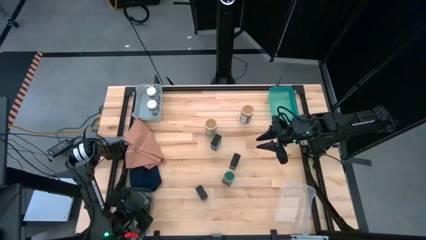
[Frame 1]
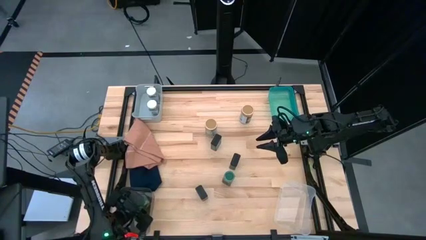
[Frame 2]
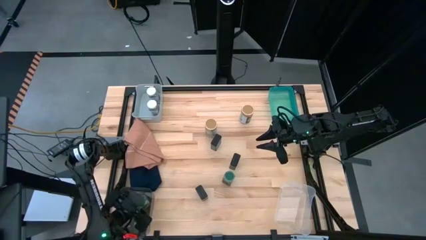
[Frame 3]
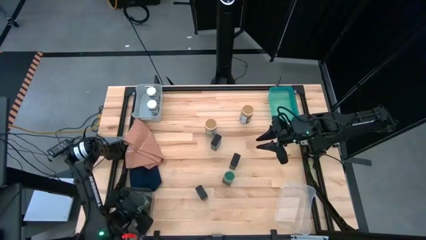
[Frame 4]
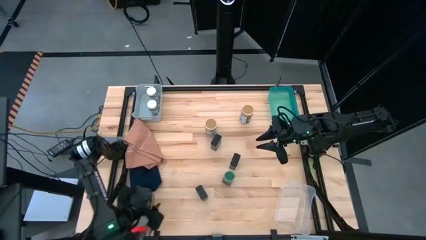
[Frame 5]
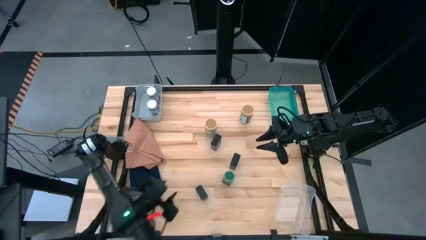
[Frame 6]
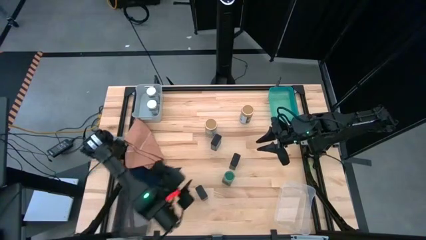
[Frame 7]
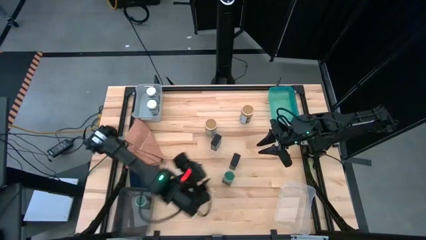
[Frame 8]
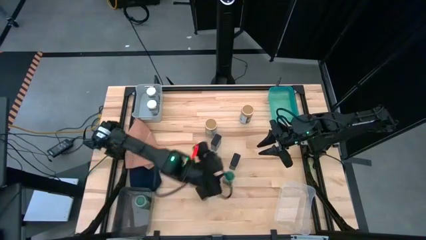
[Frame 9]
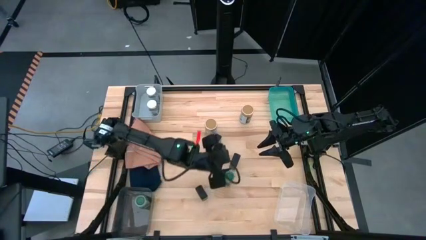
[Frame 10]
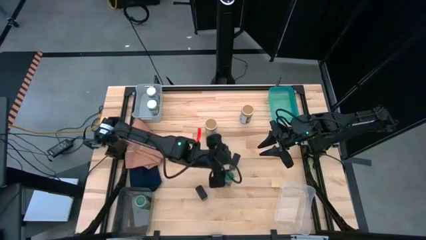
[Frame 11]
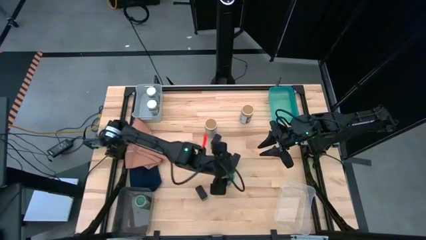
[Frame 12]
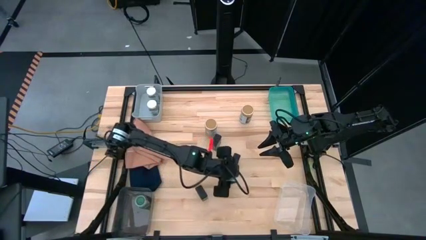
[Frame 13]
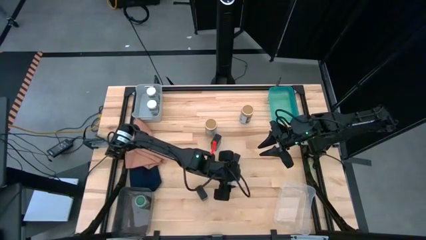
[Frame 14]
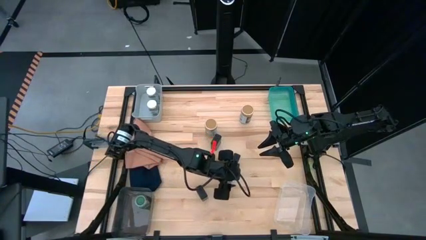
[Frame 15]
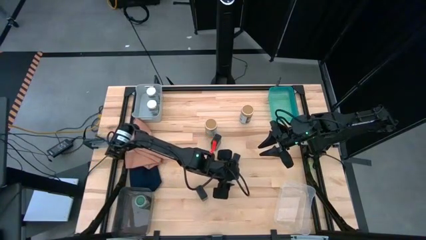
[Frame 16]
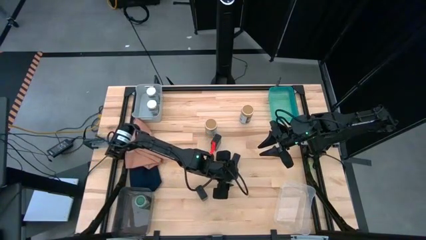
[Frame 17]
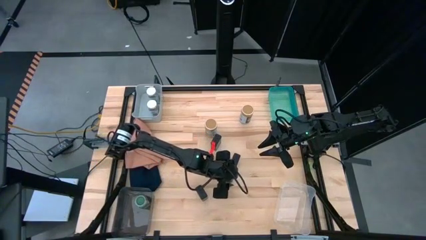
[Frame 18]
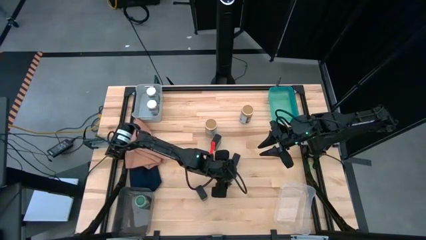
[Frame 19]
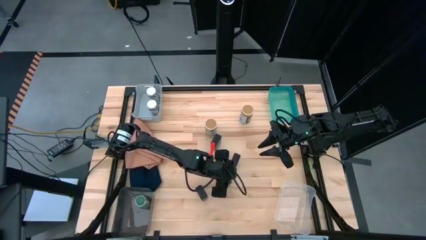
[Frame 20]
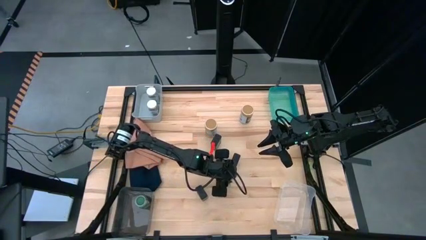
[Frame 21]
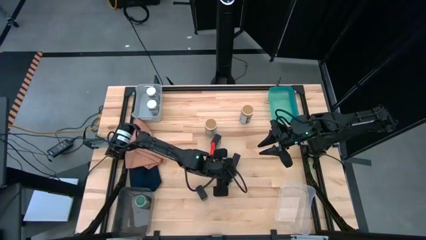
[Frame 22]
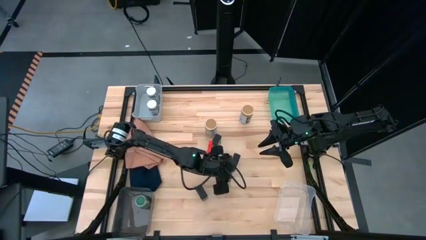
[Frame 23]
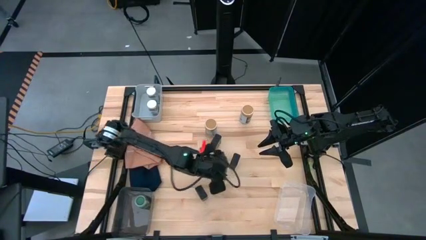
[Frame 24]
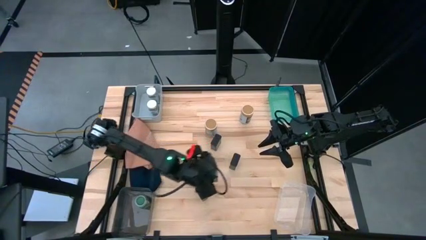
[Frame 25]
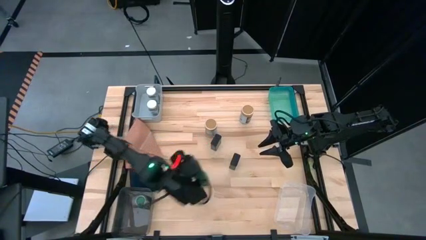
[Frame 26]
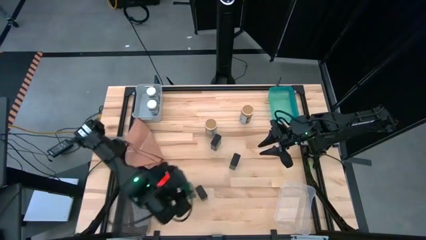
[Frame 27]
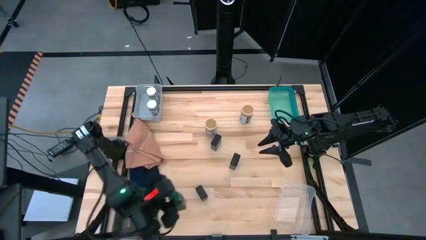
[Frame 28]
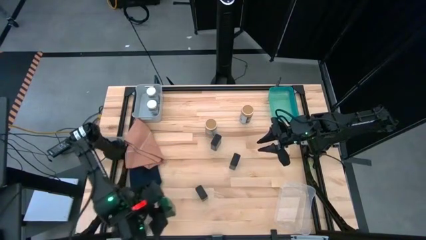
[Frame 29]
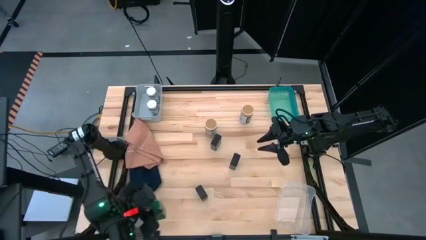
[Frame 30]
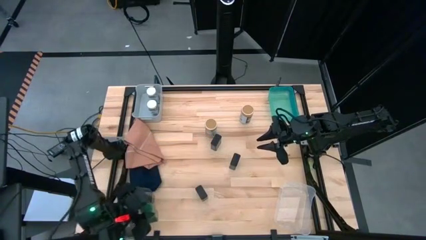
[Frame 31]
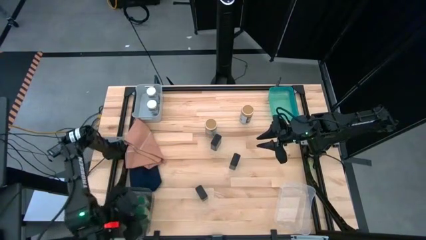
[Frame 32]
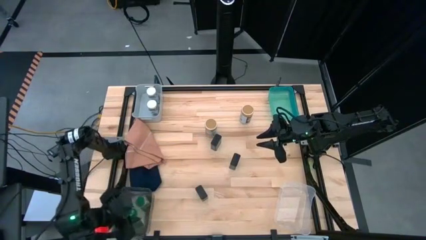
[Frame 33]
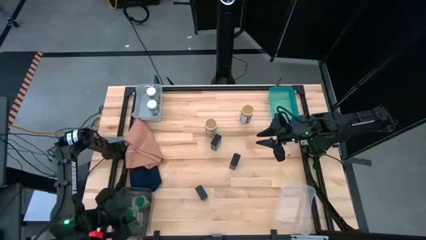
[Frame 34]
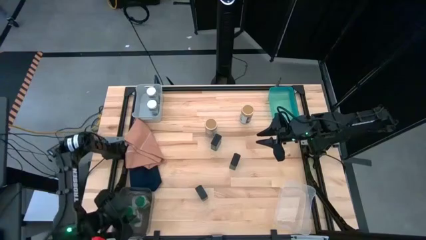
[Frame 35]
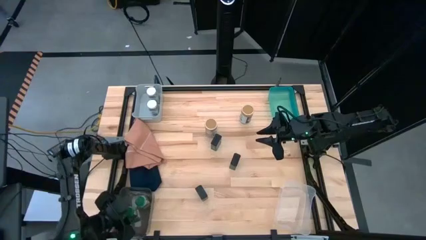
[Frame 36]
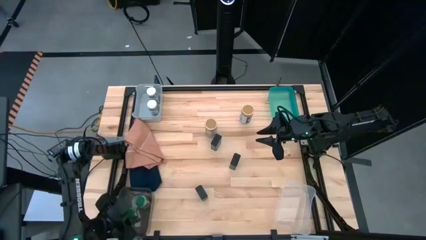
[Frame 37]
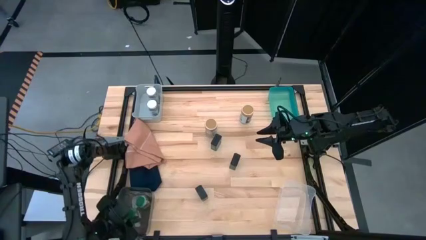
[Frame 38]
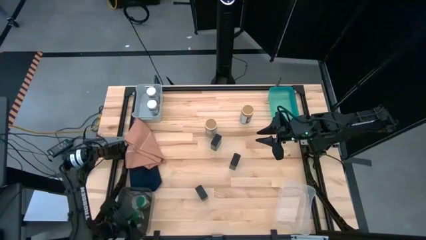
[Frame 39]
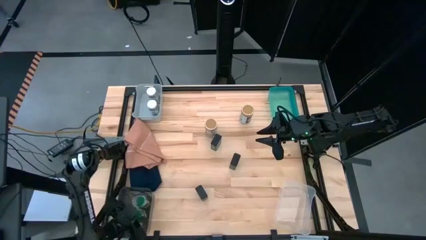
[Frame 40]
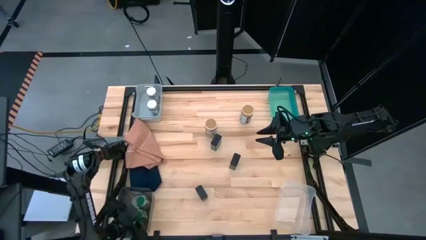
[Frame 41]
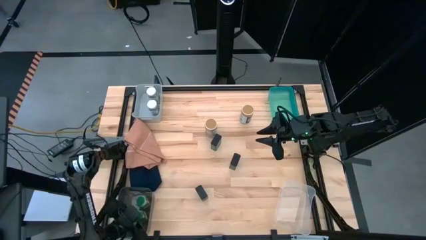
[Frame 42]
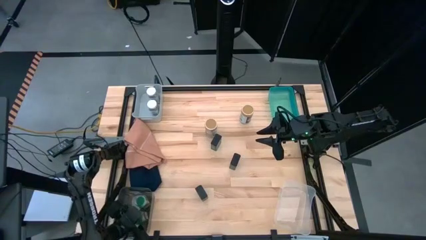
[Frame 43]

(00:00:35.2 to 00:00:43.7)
Task: Sort spices by type
Put the green spice bottle into the black transparent bin

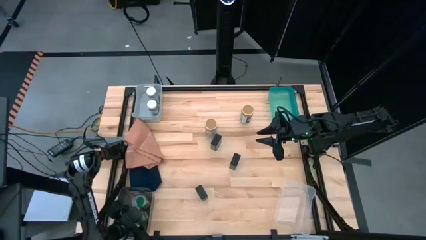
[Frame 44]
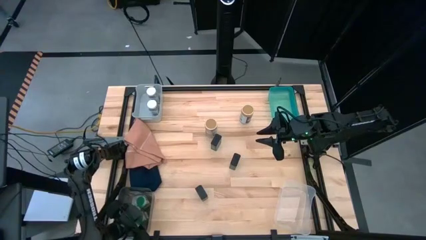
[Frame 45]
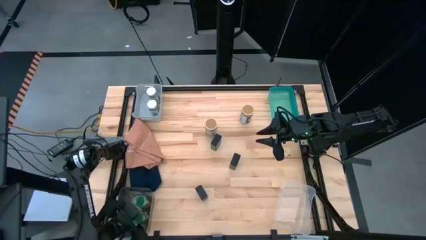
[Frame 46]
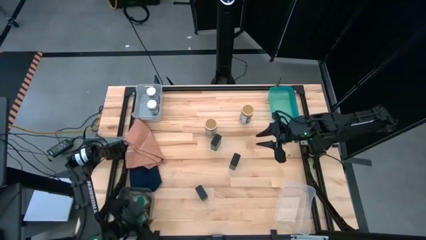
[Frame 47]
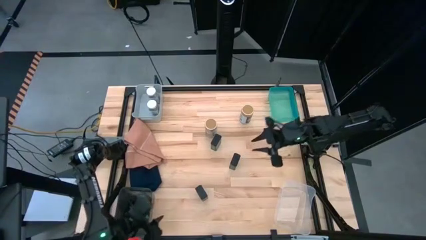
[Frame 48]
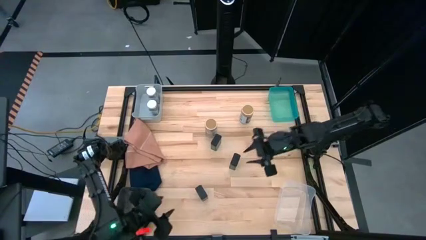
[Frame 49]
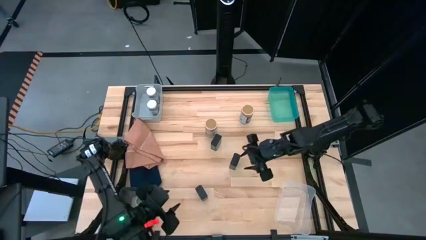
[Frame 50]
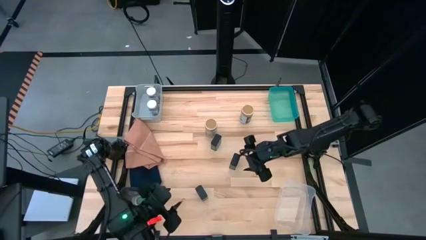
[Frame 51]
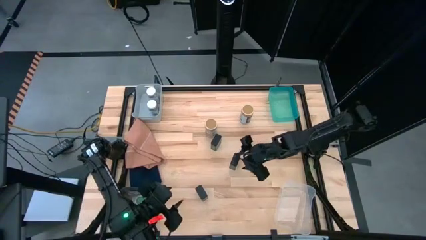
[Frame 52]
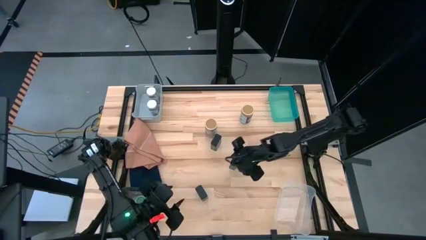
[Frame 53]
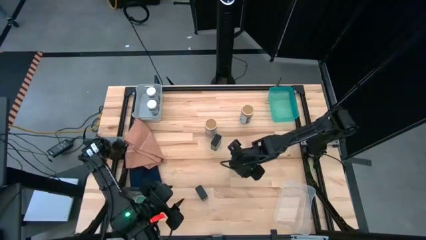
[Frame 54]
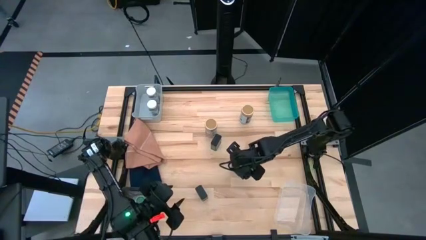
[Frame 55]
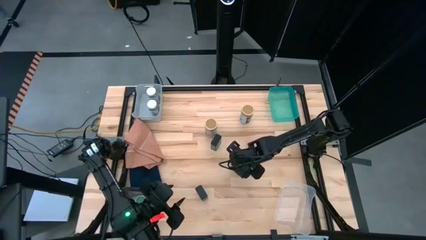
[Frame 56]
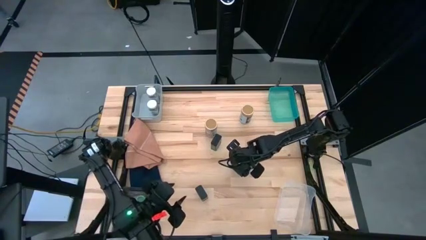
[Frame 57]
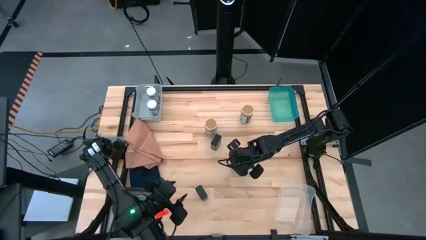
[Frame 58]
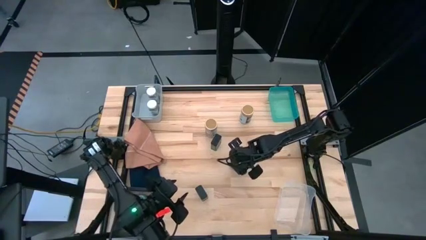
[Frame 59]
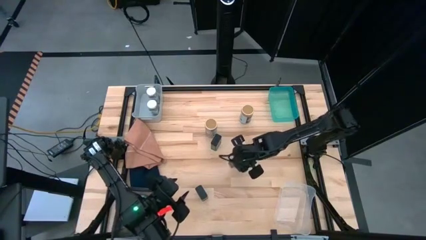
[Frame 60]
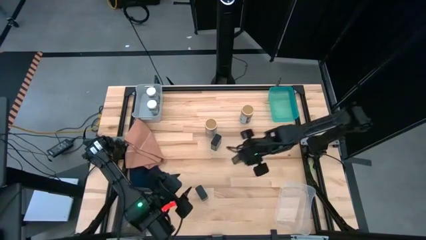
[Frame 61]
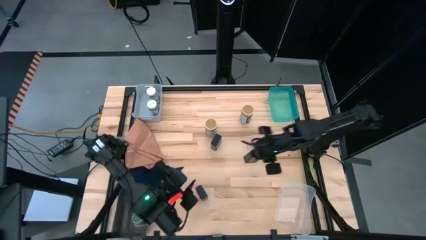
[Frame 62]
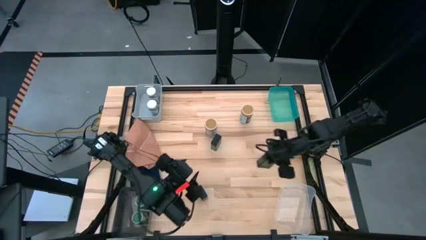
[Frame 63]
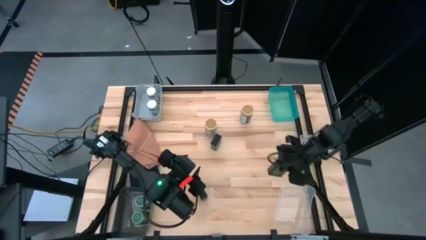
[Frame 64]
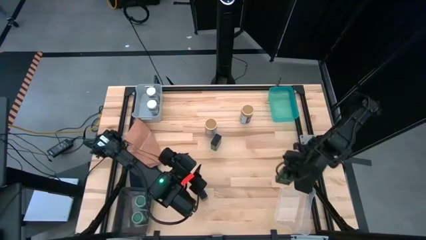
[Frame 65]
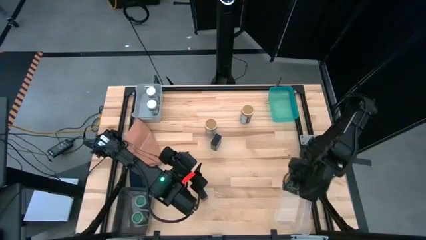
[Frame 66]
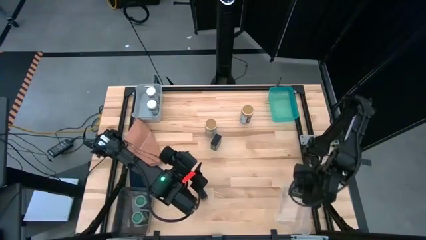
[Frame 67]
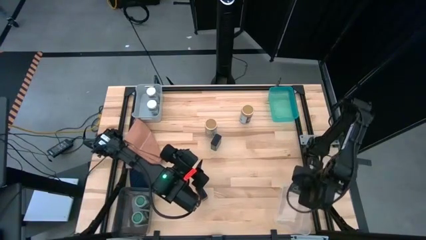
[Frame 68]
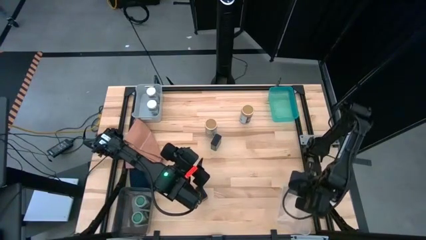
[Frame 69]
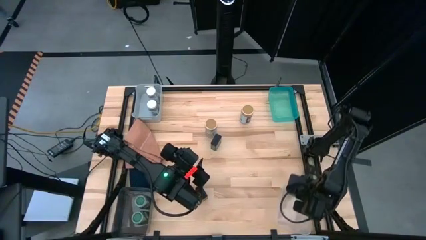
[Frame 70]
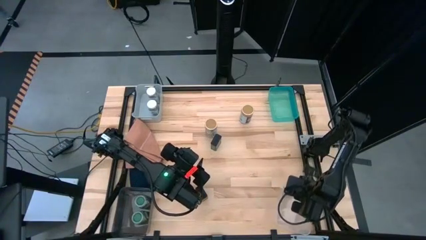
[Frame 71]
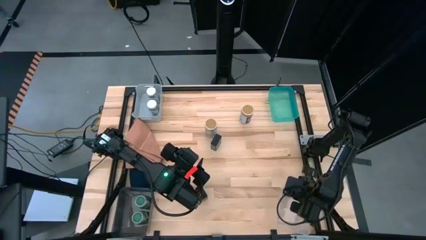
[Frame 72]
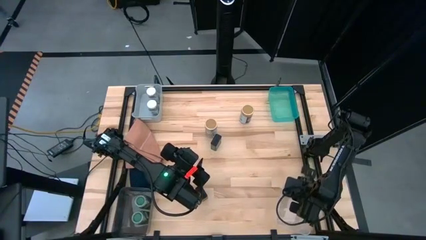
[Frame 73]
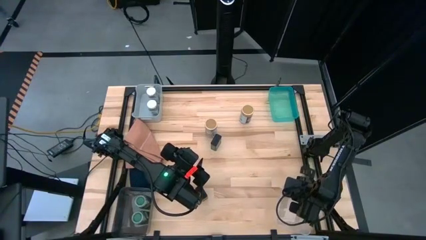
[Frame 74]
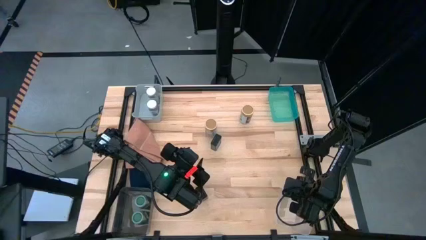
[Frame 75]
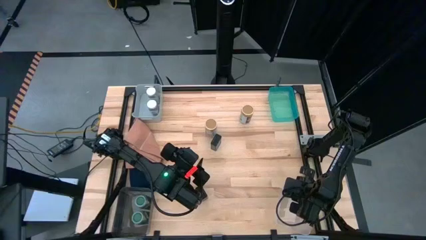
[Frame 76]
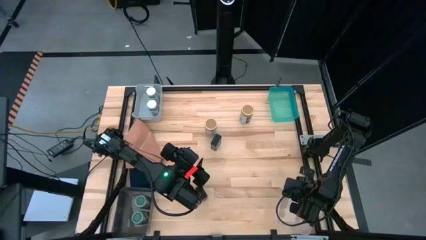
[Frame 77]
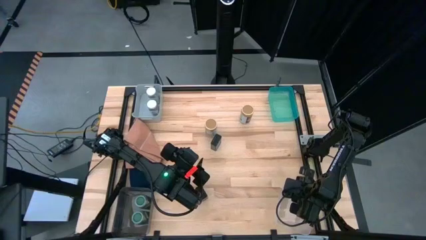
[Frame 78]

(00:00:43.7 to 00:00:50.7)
Put the middle right black spice can into the transparent bin
